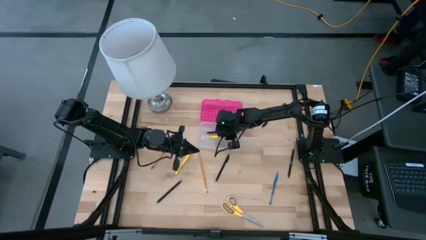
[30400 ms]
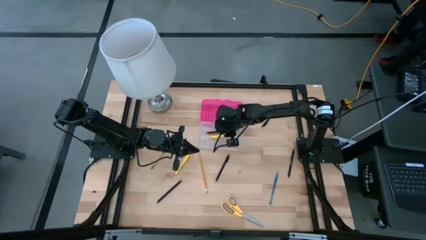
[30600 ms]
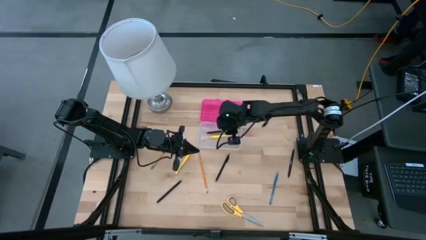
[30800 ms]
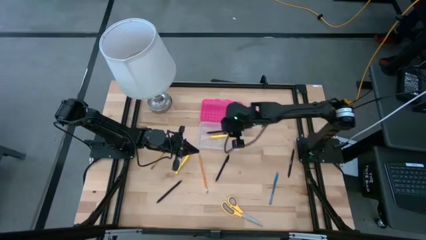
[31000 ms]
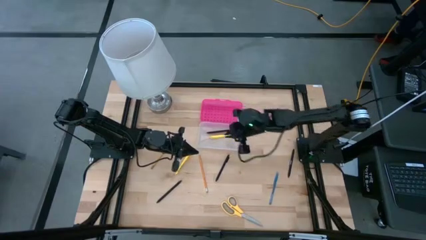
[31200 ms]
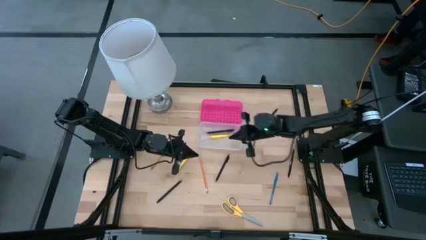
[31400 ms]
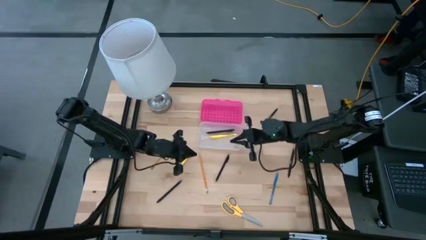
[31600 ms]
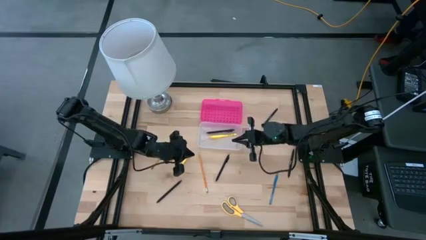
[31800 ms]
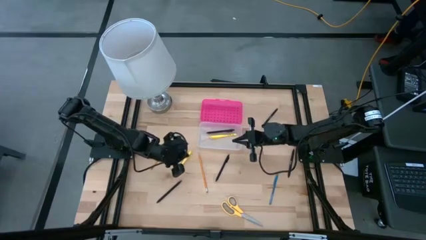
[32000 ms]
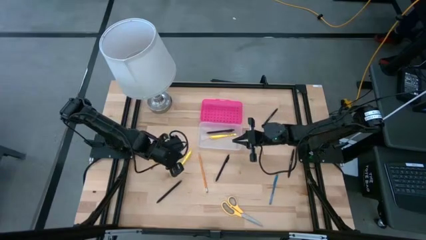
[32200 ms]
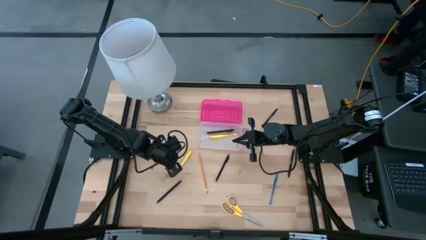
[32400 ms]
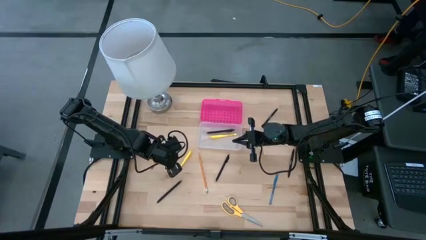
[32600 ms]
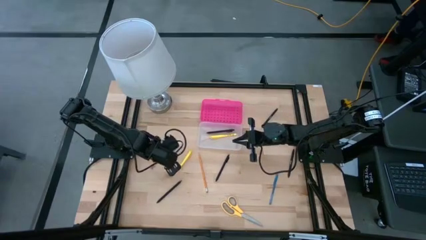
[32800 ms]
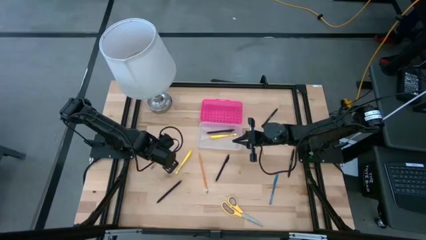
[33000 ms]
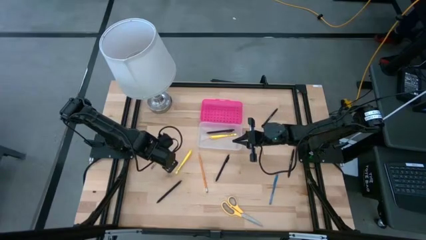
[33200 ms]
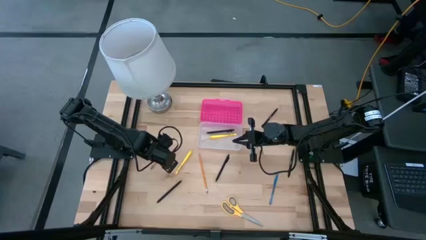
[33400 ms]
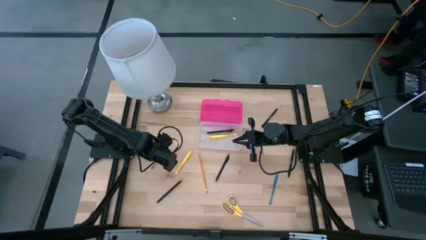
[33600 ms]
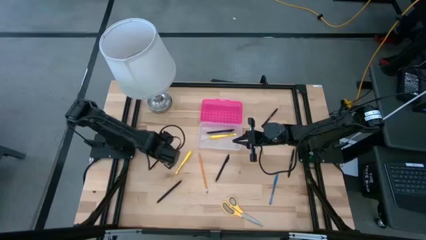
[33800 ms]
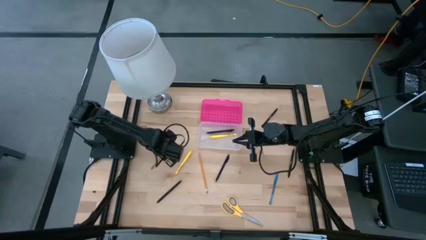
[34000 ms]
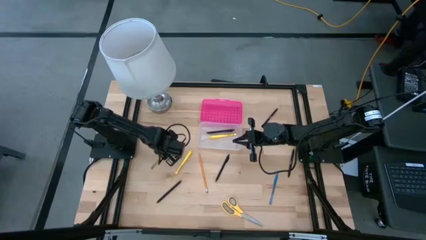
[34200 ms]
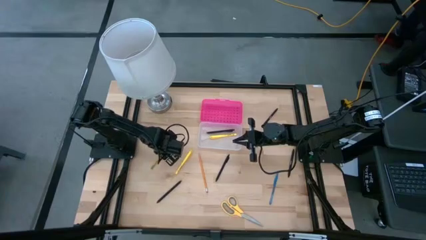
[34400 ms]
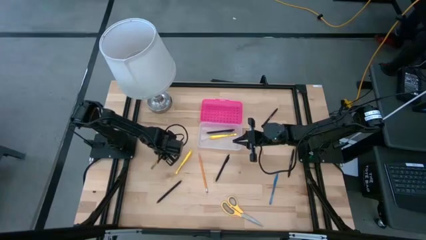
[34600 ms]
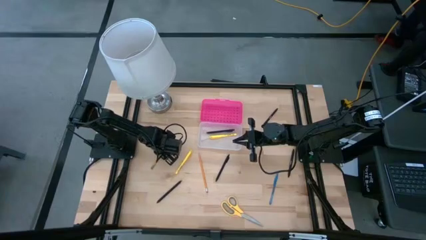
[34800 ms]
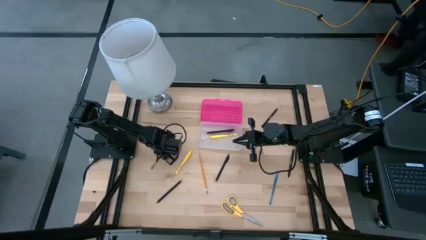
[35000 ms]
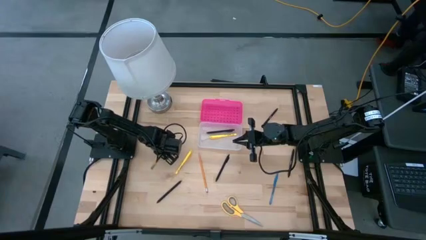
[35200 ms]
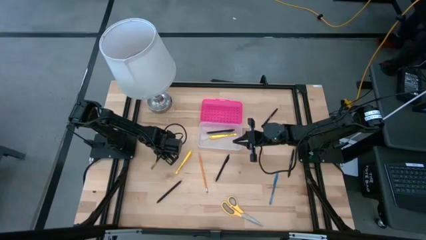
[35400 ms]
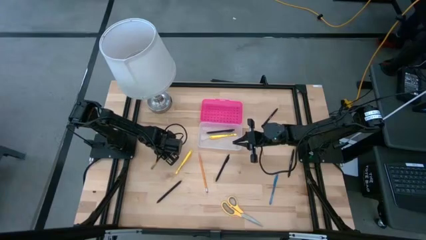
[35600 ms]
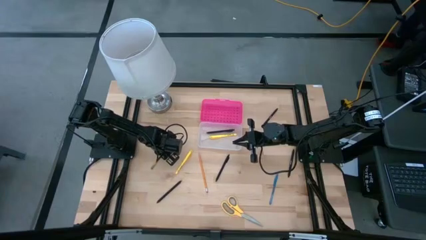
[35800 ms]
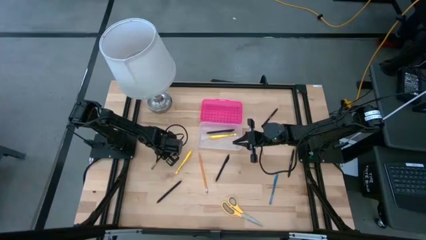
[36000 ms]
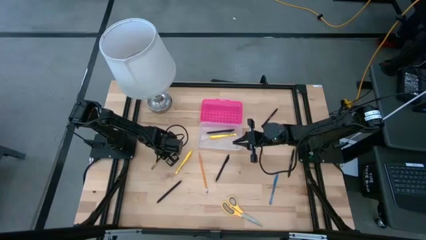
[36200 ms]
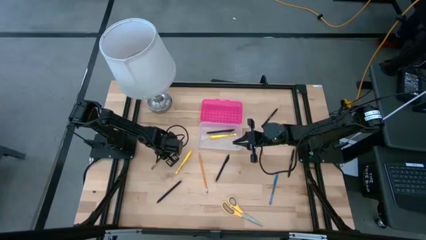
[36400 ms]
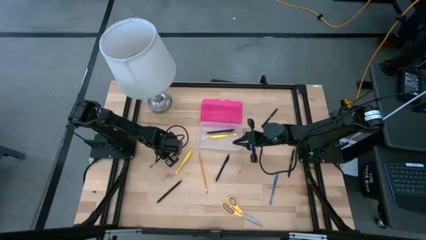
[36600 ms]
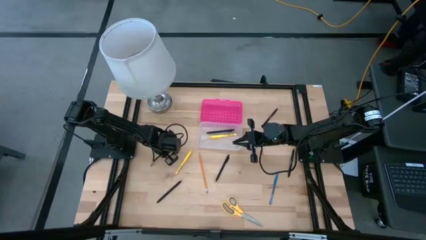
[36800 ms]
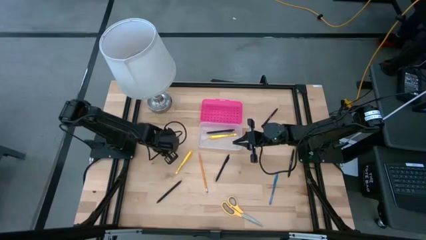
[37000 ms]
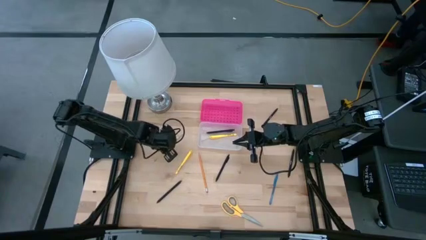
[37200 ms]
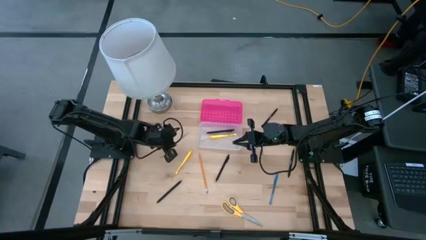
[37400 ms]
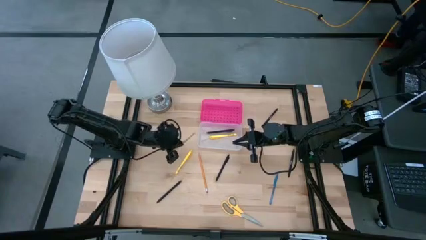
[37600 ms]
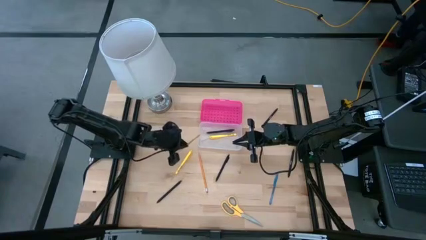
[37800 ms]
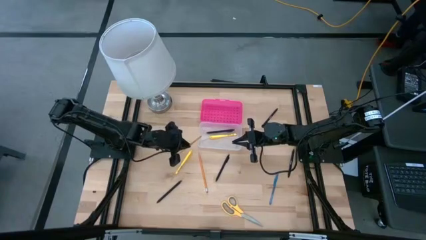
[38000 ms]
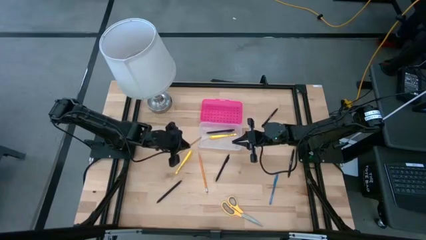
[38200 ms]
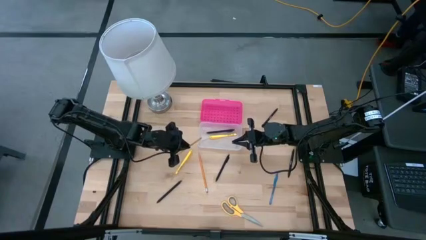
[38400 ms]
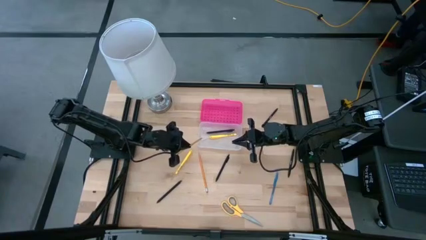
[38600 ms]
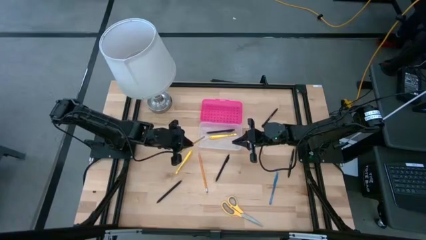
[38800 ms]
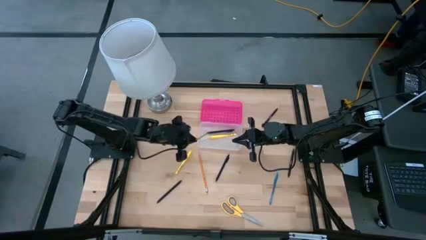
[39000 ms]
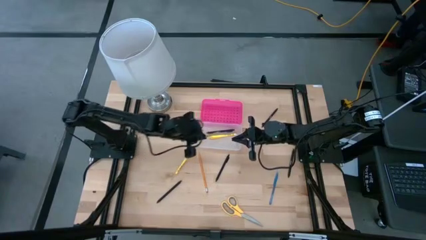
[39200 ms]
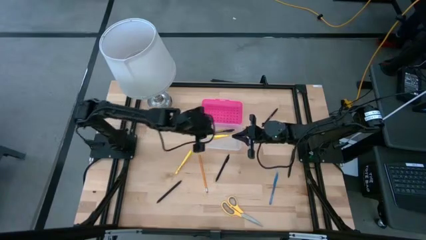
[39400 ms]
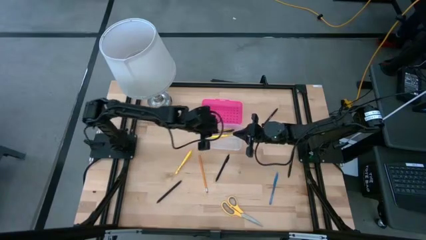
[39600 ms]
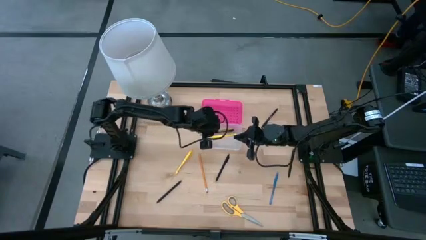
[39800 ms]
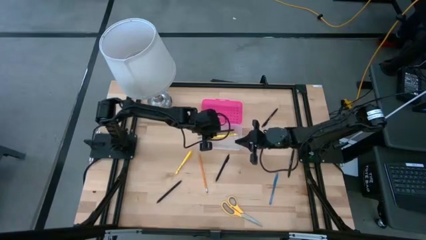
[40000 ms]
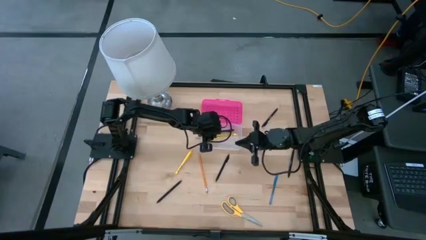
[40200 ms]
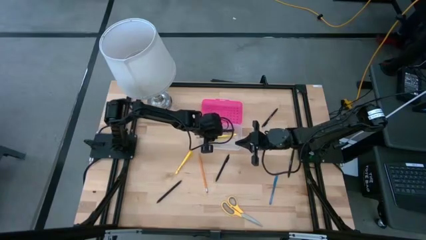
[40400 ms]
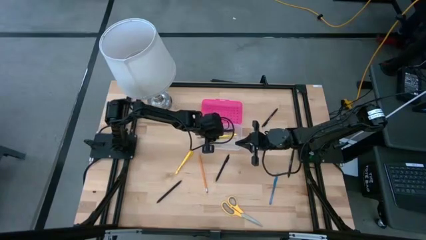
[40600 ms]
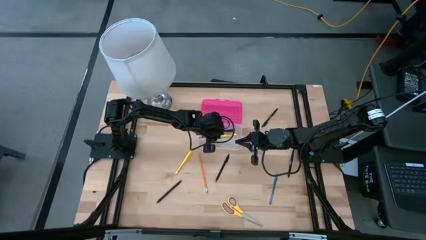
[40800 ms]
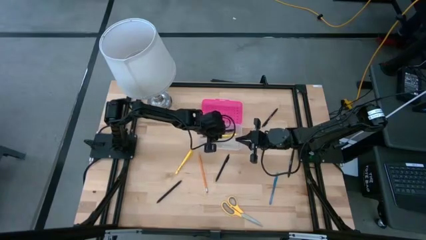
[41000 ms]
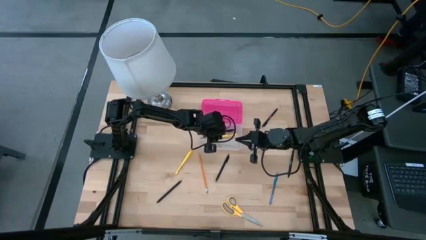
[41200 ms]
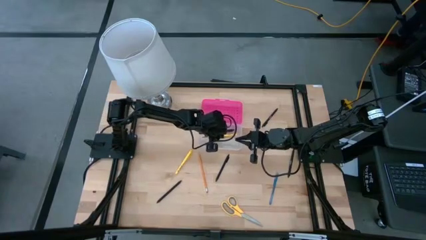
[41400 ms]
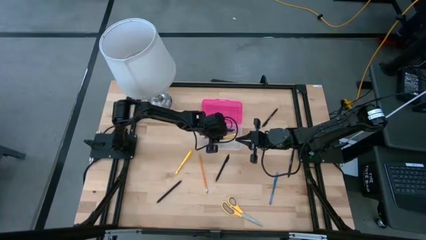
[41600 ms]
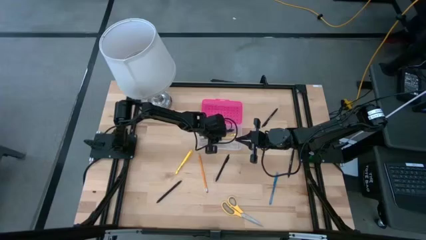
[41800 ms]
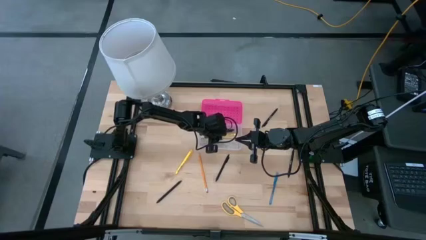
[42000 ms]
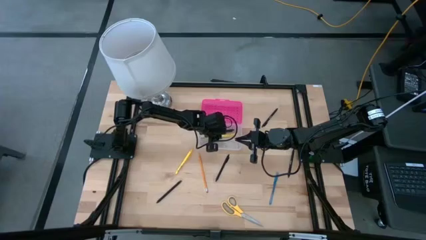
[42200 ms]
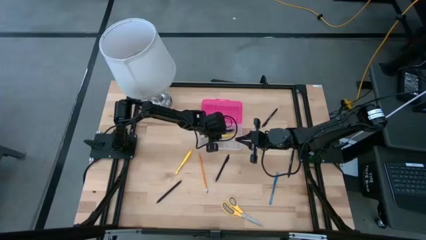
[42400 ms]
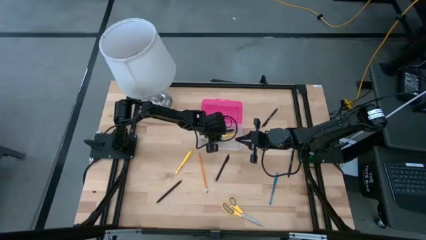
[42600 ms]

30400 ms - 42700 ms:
Task: Pick & place school supplies into a supply box
Put the yellow pencil into the pink supply box
